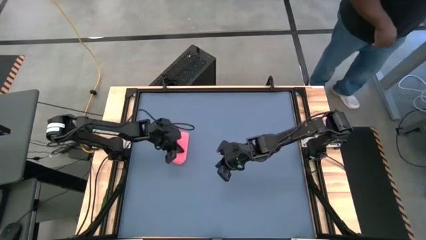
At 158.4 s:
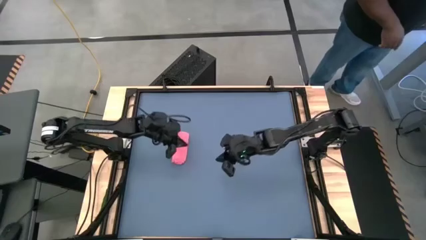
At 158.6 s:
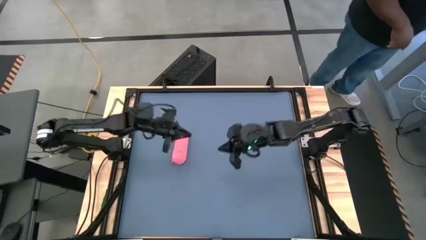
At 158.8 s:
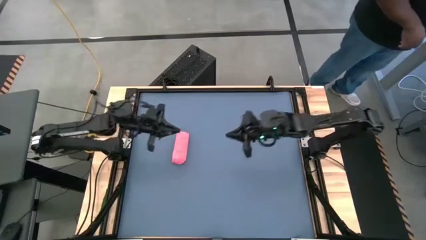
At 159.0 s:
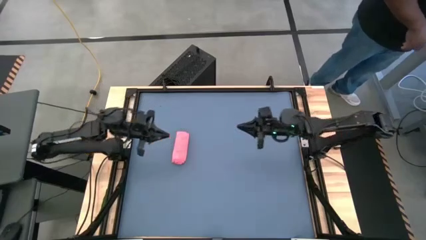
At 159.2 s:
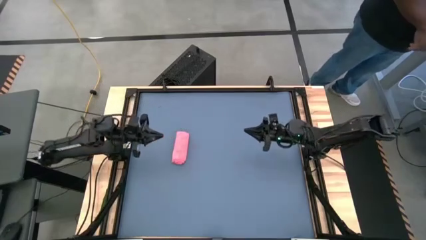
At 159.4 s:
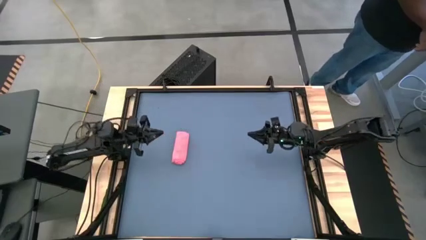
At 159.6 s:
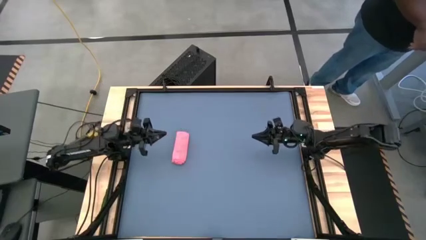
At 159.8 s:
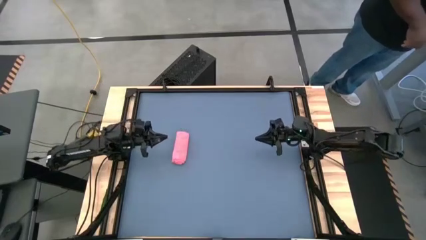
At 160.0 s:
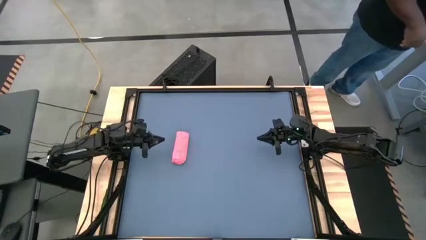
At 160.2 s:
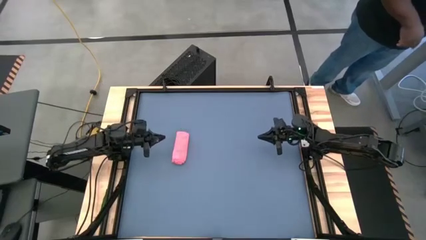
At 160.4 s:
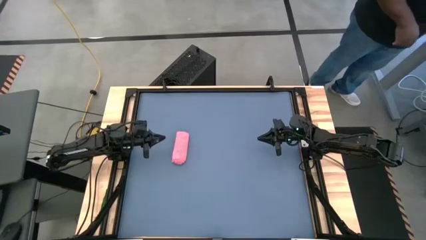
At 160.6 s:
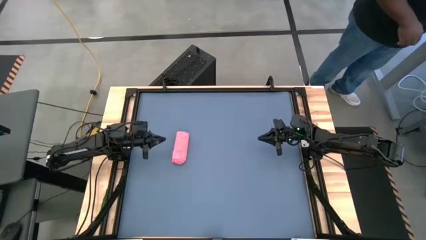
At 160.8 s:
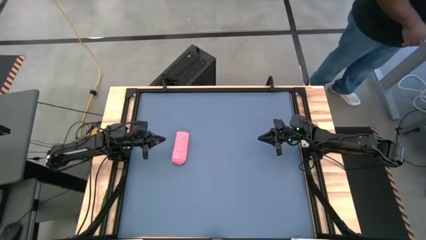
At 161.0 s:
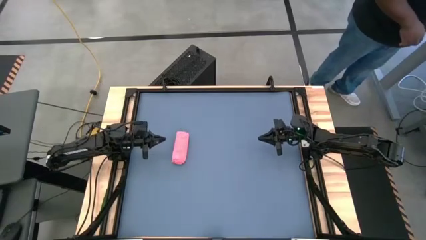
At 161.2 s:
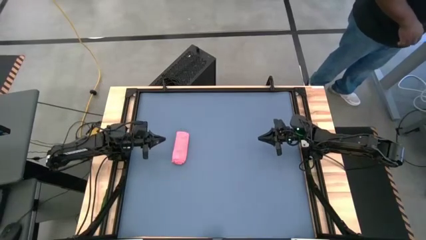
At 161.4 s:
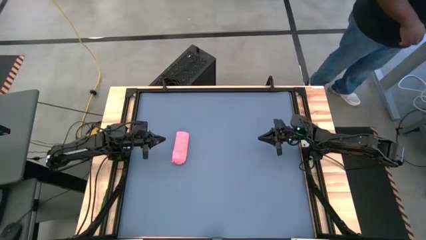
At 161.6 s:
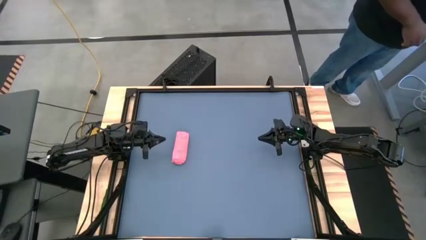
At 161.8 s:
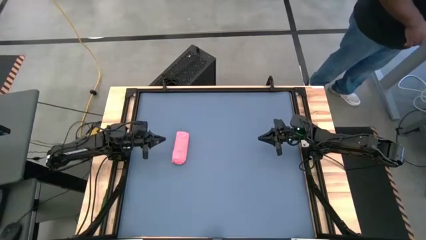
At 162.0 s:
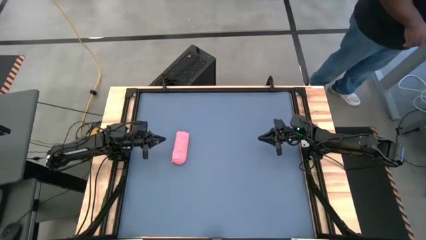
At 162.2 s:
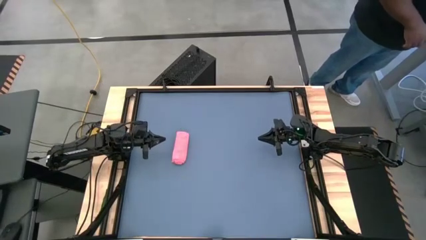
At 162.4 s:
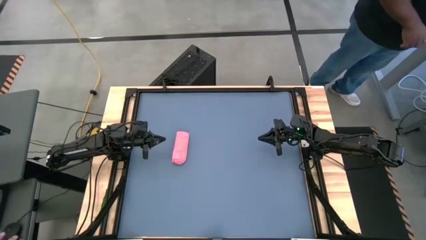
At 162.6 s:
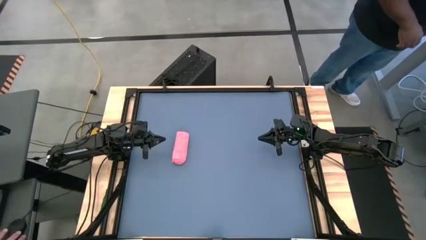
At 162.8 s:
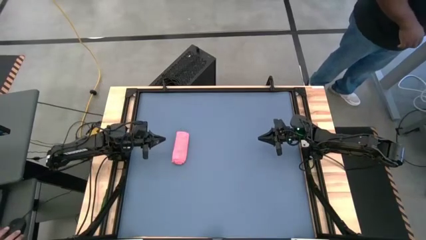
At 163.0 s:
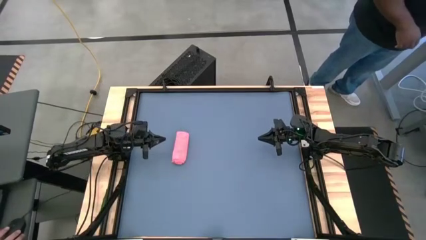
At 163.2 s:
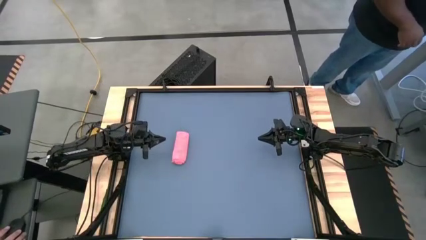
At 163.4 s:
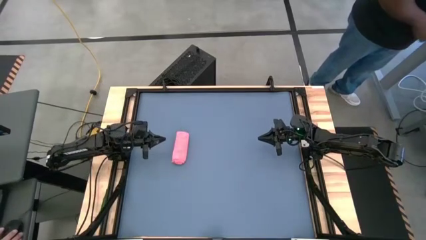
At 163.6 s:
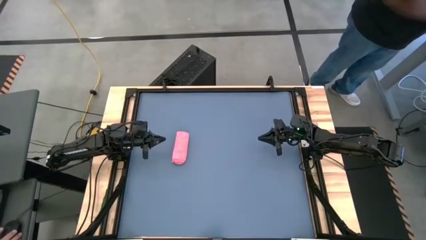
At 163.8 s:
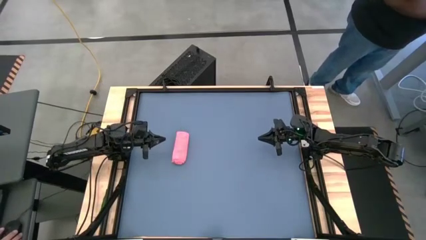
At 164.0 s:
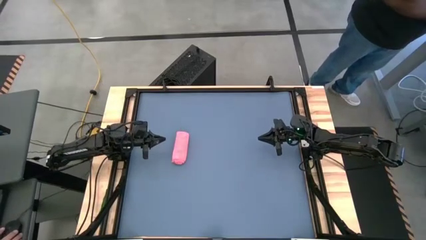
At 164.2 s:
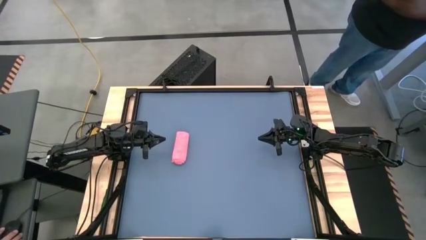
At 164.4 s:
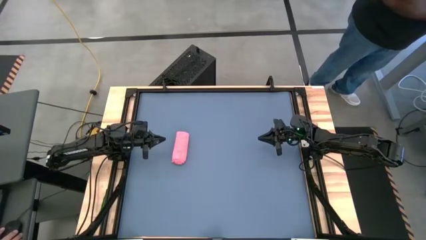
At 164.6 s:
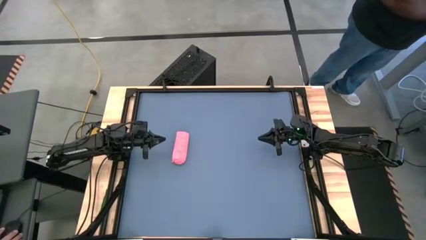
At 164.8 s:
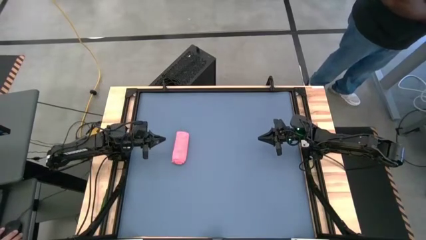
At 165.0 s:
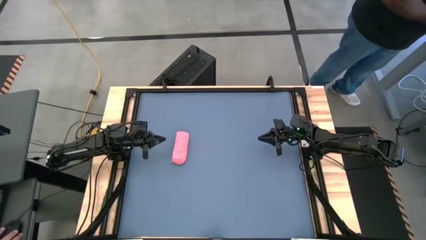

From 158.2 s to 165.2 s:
Task: Roll towel
Return to Home Position

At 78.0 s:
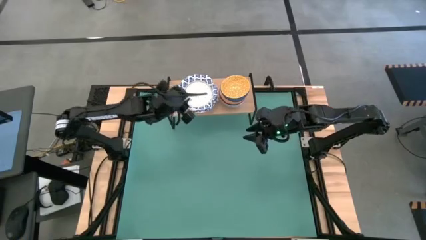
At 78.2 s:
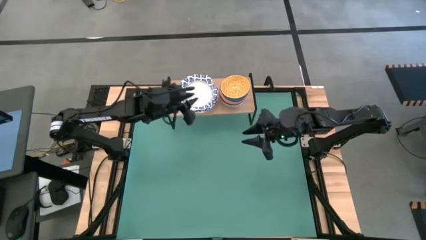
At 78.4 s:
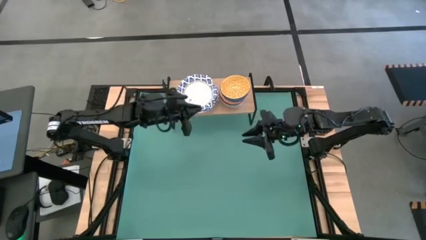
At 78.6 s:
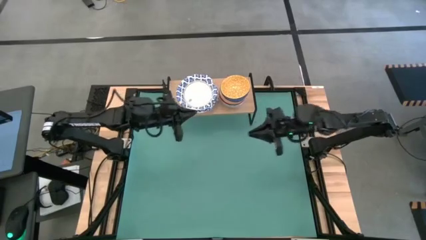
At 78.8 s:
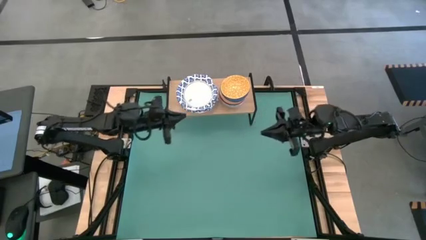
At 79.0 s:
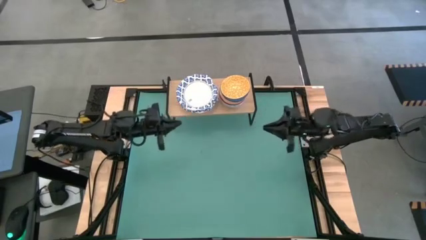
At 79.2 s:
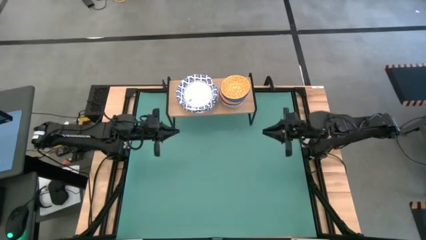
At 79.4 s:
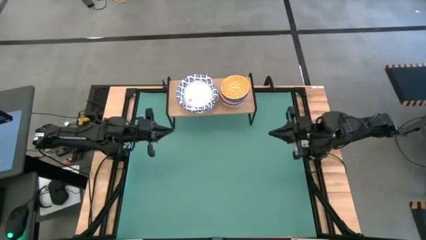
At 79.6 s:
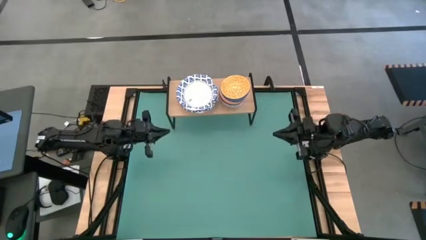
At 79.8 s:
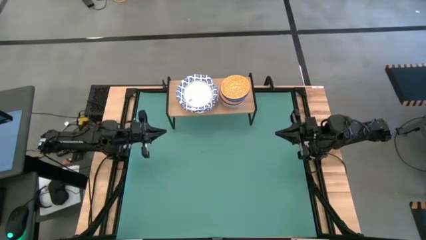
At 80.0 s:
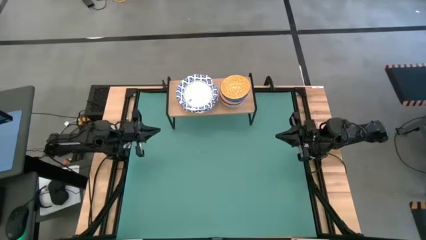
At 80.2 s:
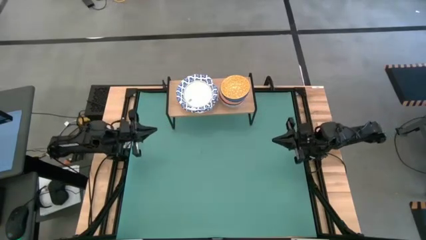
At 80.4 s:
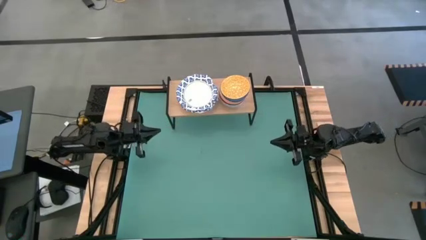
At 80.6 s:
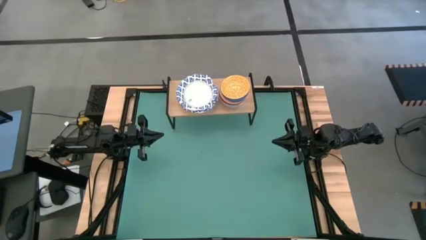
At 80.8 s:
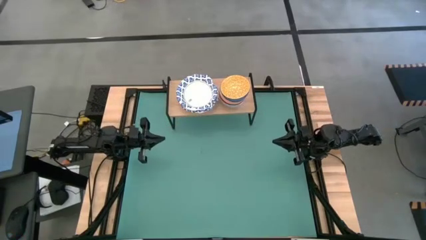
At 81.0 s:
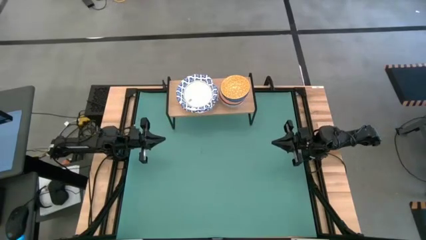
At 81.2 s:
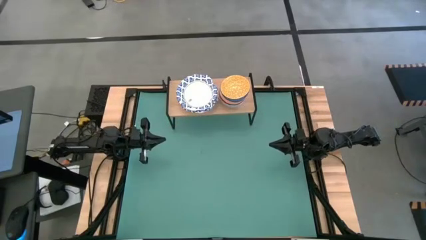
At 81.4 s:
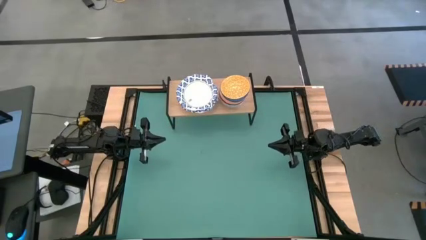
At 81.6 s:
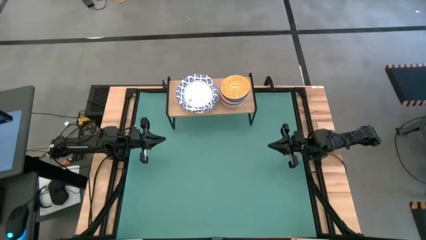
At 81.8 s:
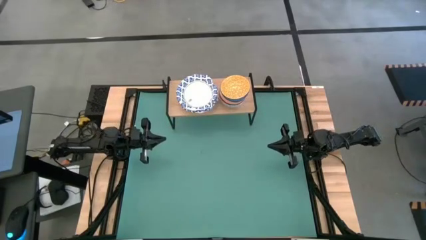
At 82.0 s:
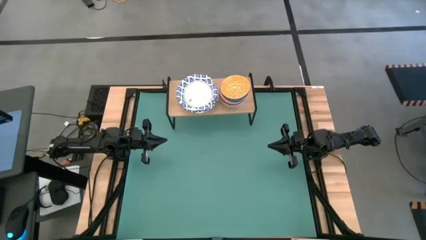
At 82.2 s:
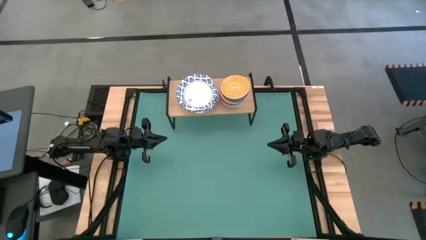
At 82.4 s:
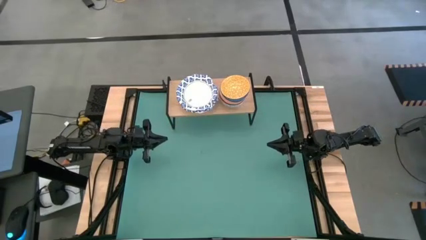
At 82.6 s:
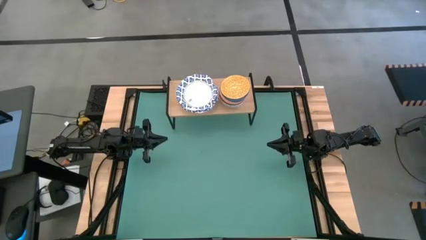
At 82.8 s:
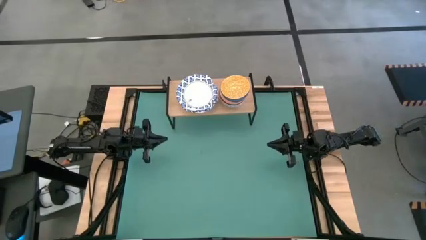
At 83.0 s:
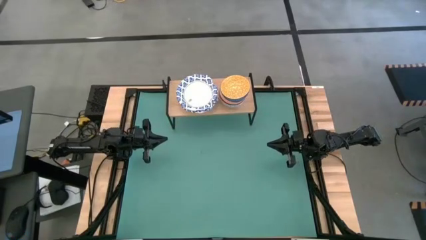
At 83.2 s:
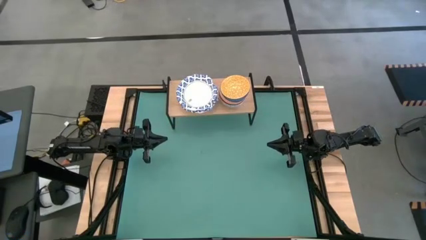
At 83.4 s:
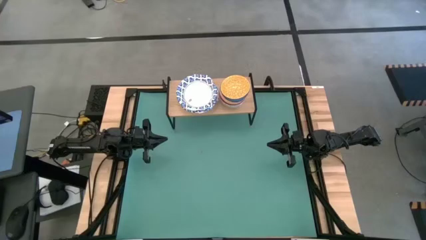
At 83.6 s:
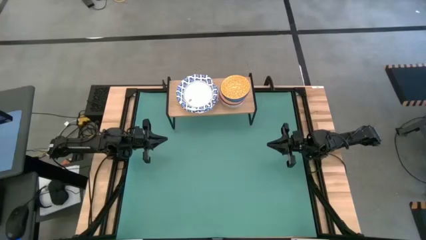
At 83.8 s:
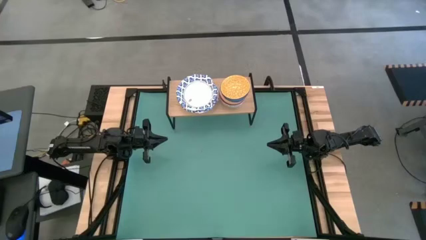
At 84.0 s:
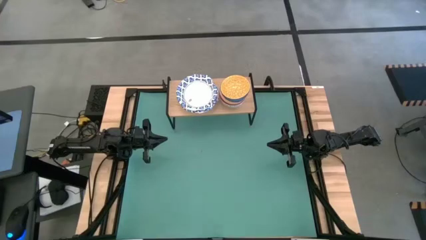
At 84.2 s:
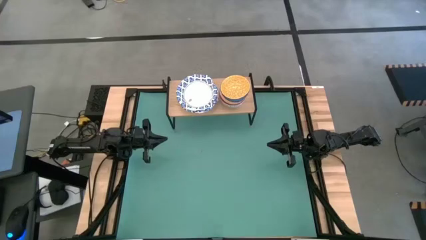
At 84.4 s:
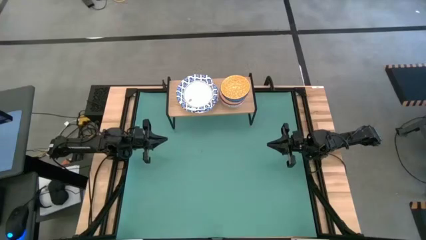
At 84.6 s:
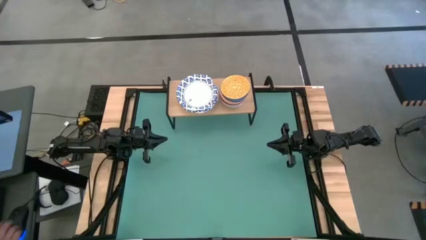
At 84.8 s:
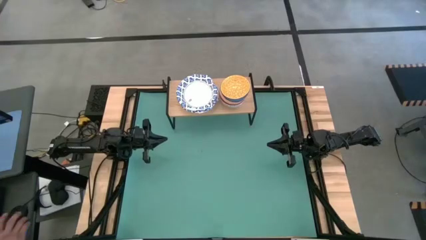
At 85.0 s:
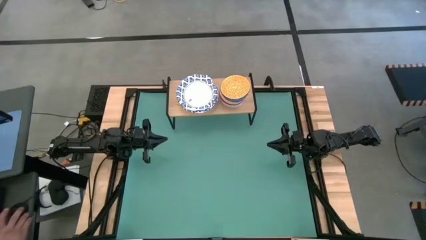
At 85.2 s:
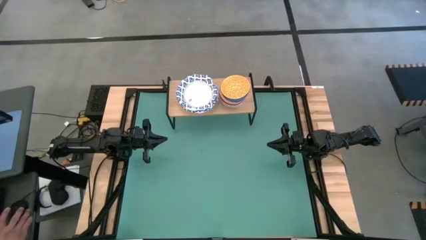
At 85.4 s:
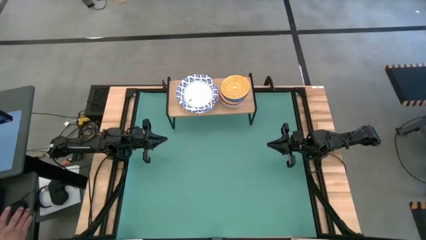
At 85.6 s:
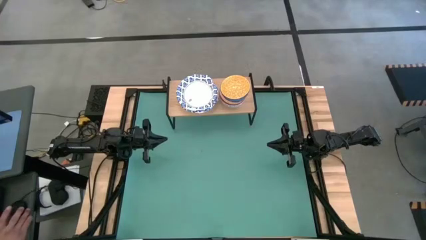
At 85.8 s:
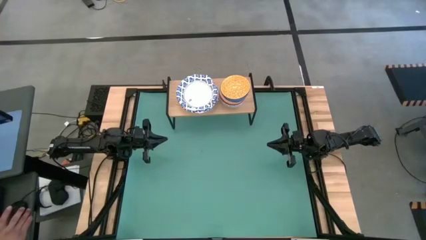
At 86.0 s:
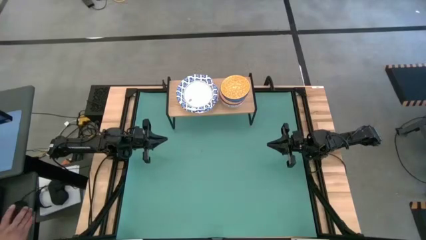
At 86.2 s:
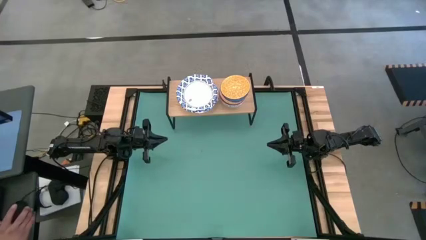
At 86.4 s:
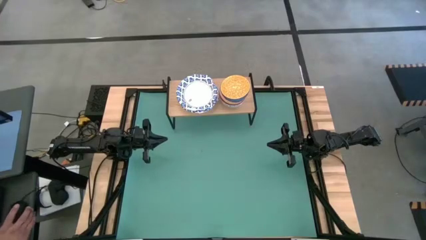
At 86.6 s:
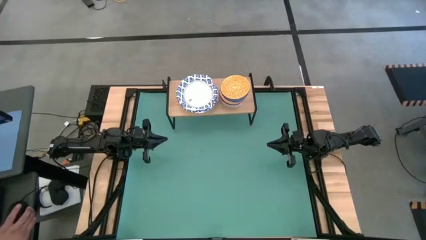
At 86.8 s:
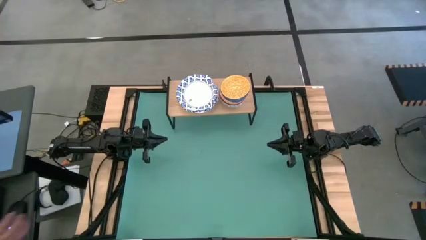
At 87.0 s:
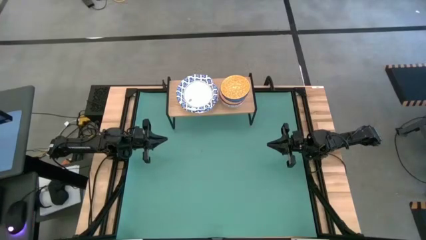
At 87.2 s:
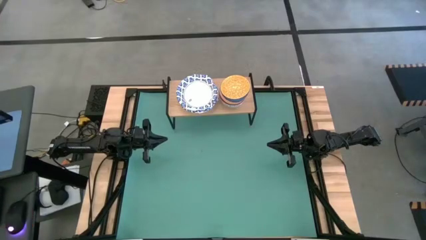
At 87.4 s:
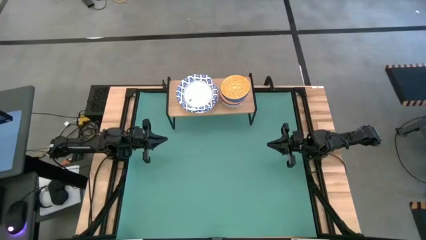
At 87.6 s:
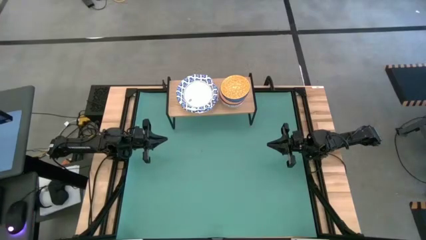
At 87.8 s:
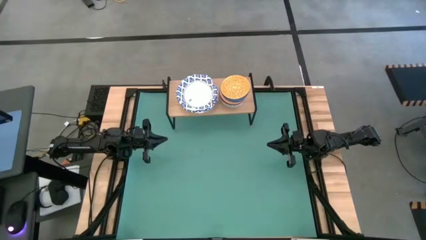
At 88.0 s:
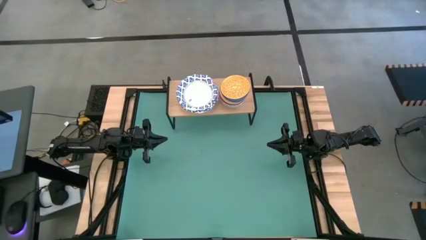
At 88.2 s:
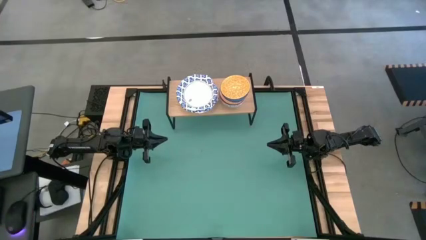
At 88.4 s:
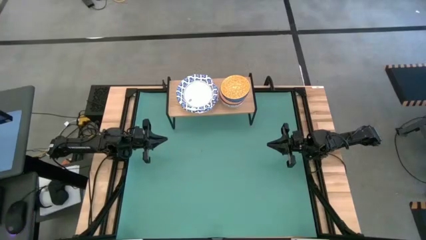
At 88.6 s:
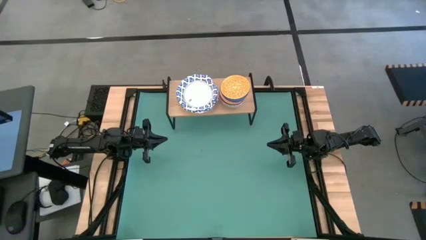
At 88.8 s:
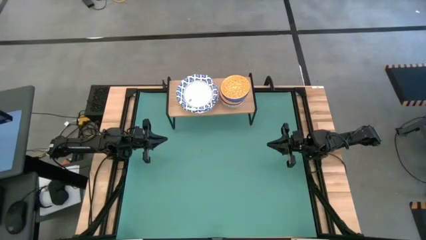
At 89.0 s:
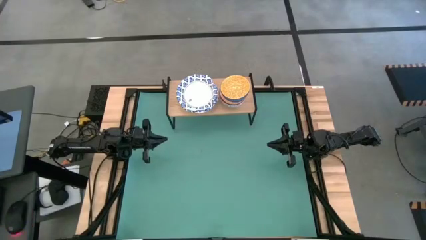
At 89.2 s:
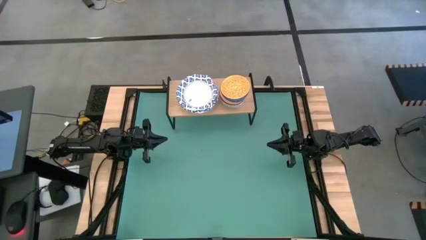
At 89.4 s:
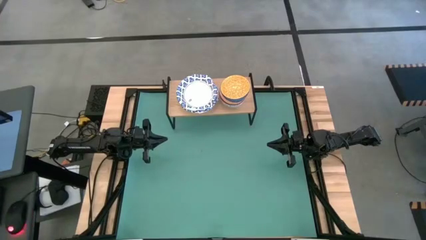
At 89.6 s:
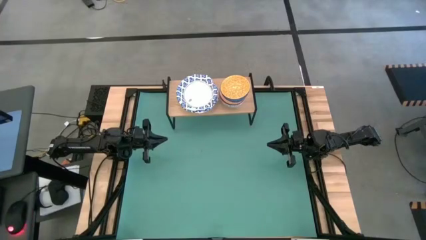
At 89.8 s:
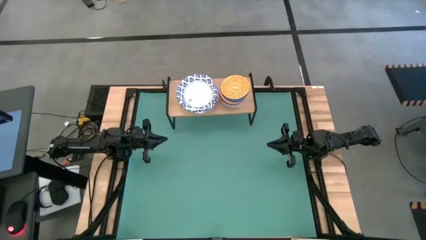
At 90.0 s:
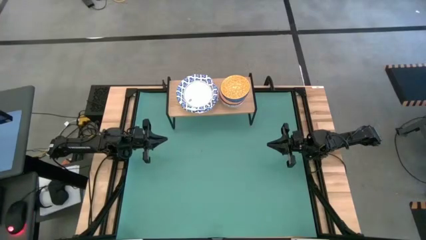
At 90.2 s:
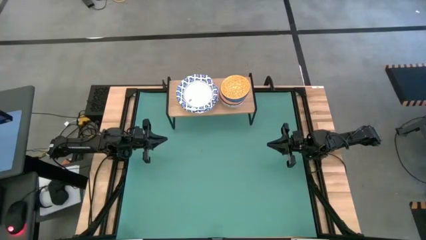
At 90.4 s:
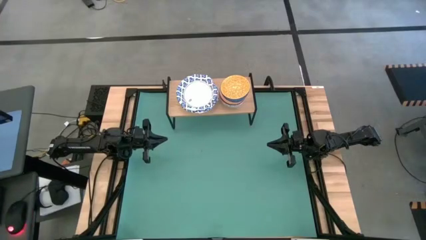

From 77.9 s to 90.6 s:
Task: Place and stack bowls onto a shelf
Return to Home Position
